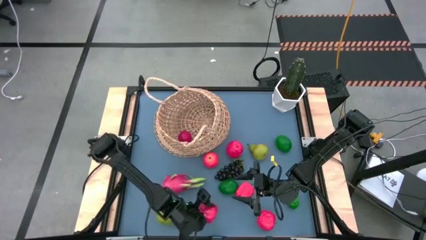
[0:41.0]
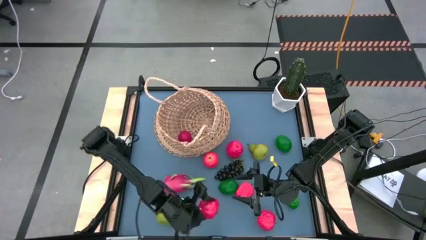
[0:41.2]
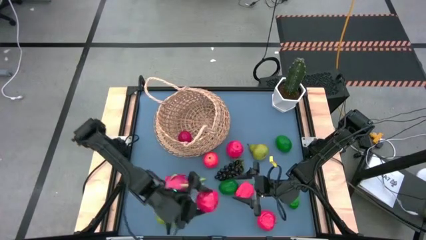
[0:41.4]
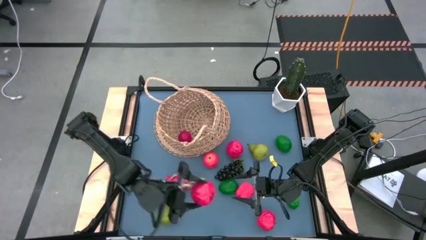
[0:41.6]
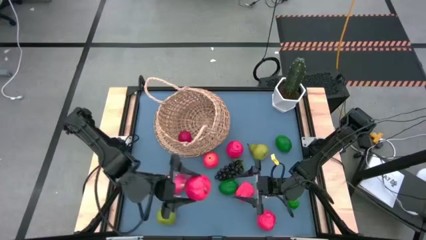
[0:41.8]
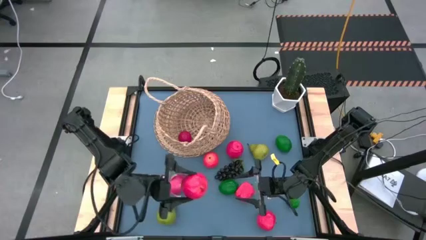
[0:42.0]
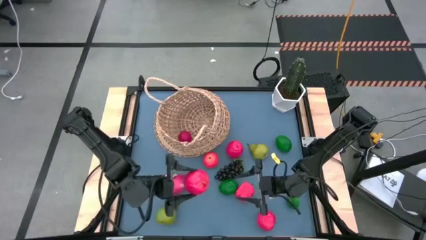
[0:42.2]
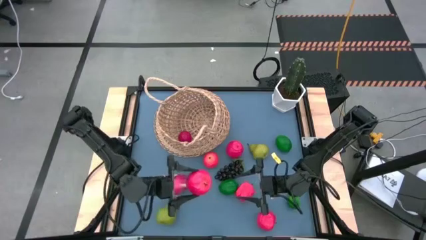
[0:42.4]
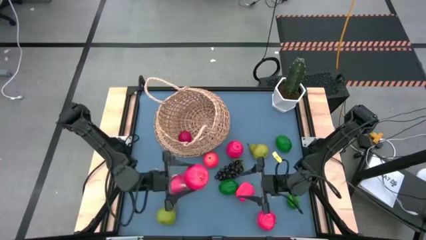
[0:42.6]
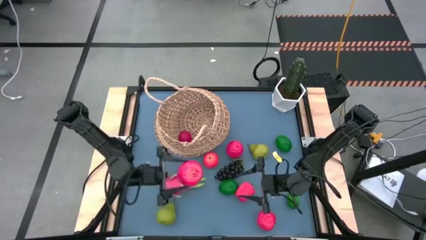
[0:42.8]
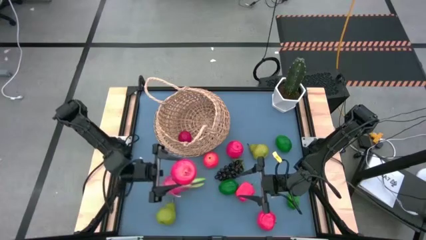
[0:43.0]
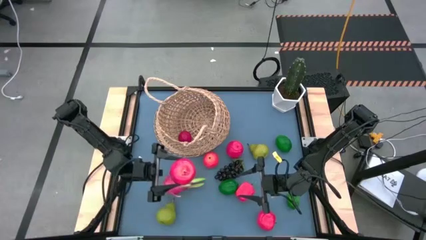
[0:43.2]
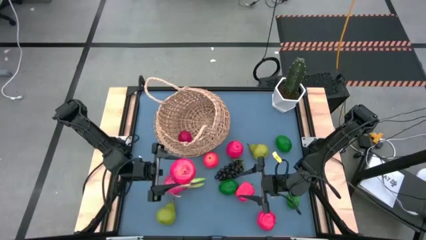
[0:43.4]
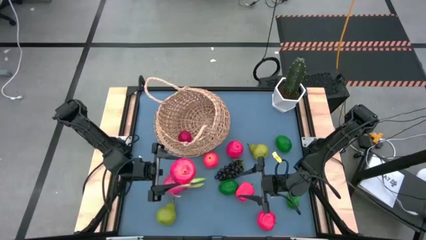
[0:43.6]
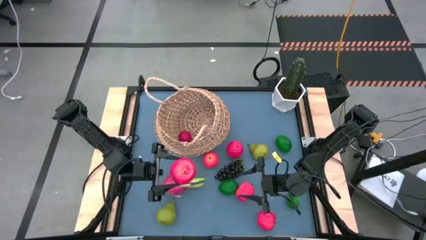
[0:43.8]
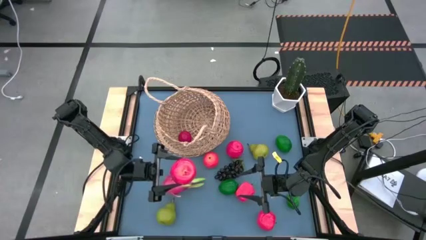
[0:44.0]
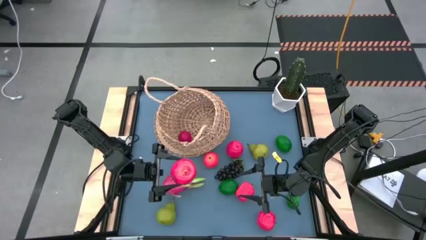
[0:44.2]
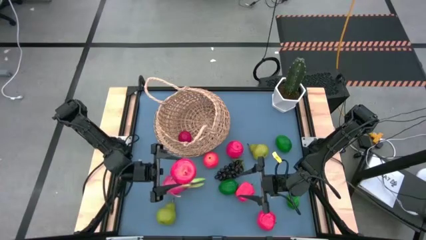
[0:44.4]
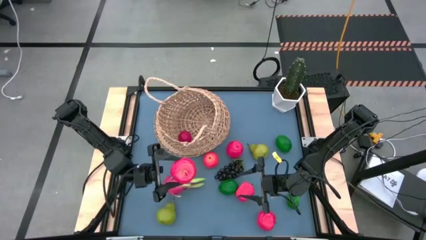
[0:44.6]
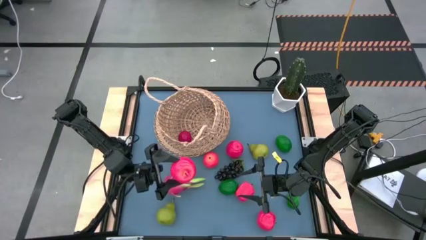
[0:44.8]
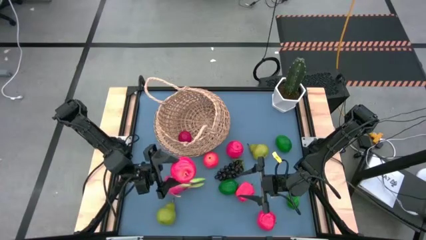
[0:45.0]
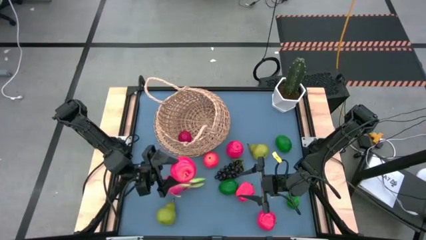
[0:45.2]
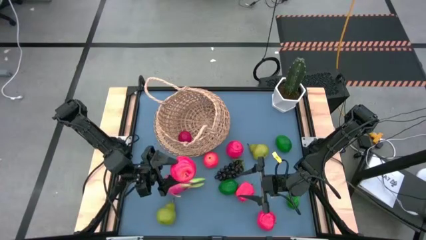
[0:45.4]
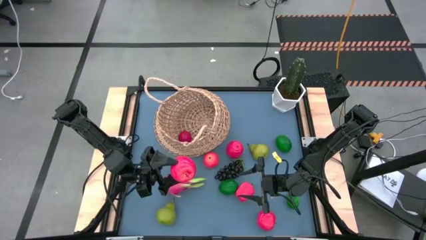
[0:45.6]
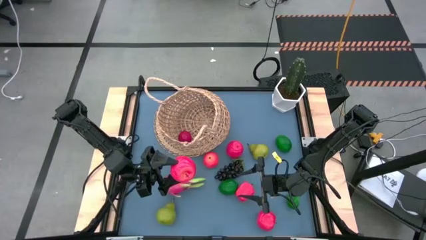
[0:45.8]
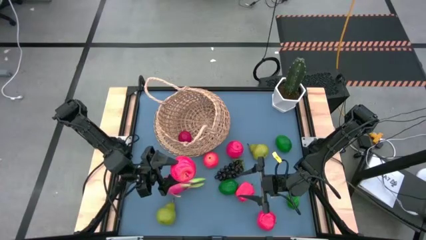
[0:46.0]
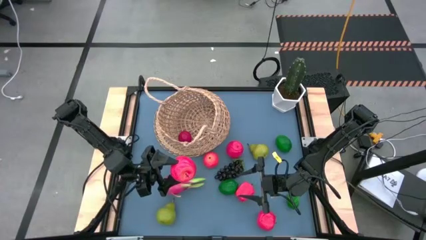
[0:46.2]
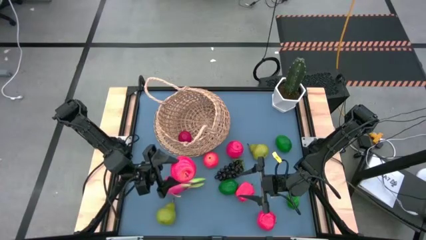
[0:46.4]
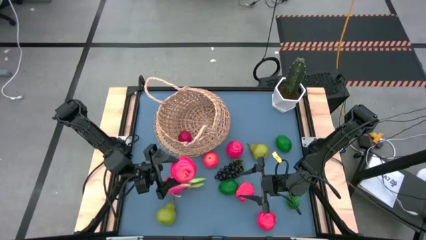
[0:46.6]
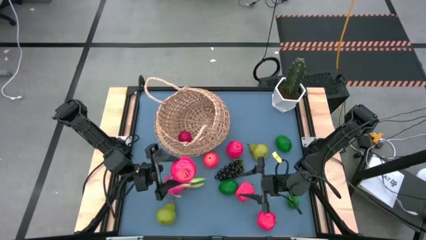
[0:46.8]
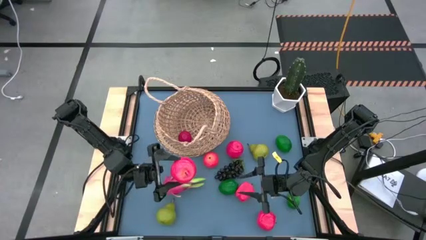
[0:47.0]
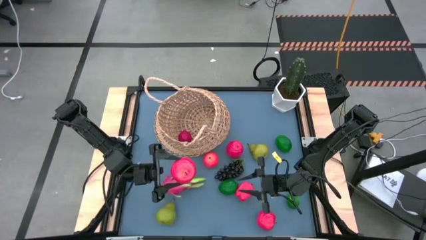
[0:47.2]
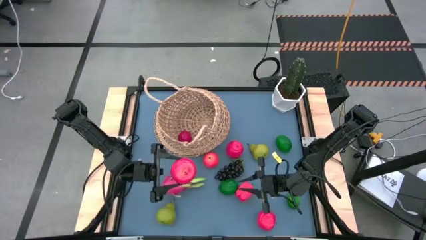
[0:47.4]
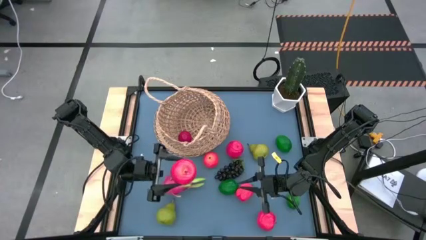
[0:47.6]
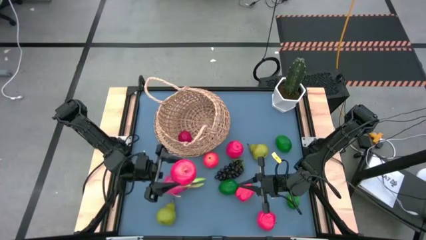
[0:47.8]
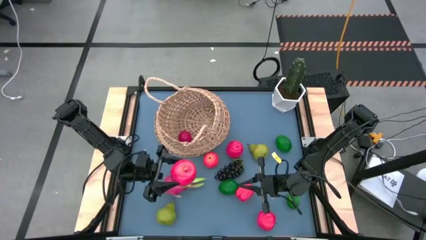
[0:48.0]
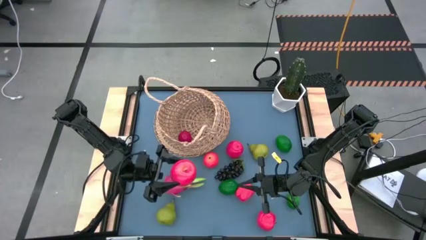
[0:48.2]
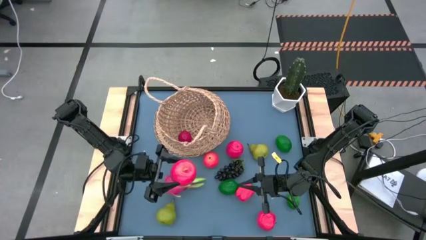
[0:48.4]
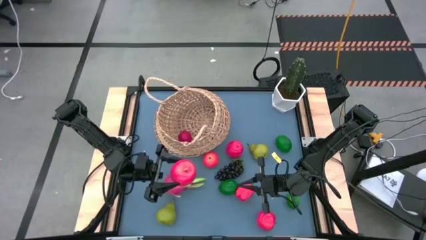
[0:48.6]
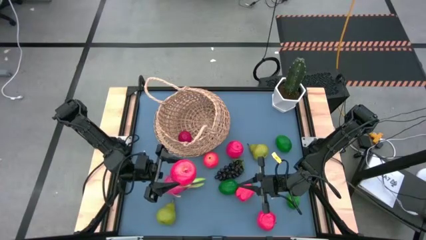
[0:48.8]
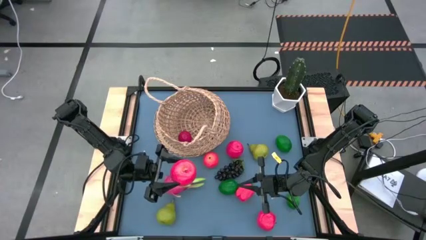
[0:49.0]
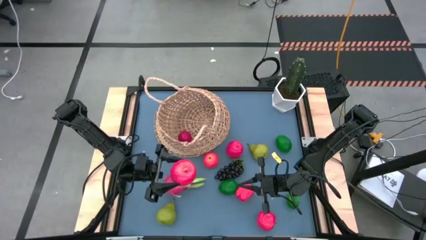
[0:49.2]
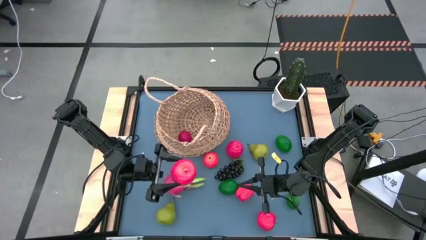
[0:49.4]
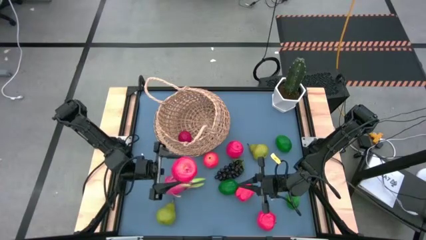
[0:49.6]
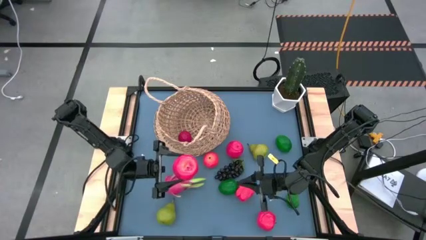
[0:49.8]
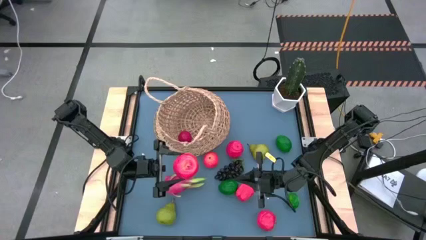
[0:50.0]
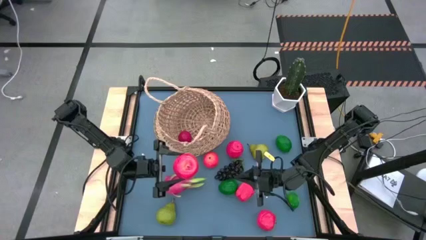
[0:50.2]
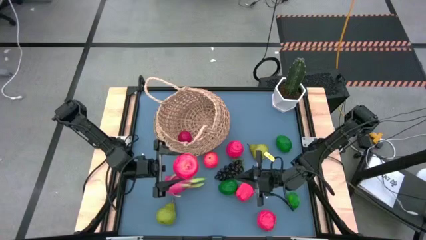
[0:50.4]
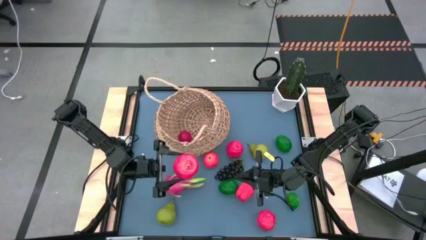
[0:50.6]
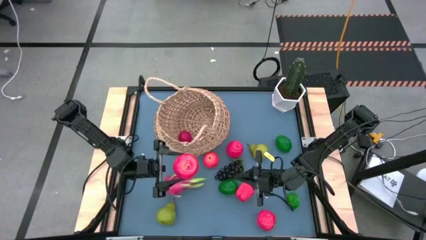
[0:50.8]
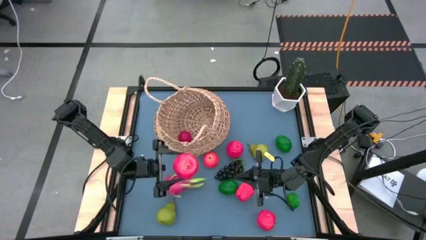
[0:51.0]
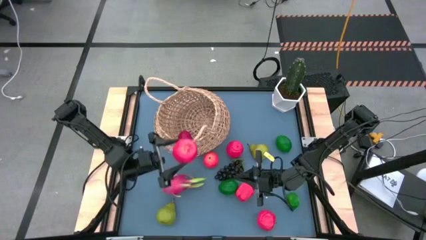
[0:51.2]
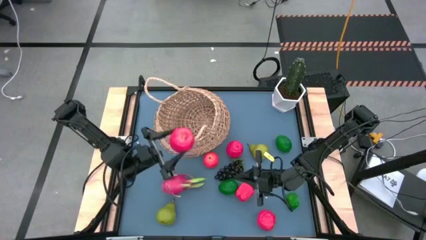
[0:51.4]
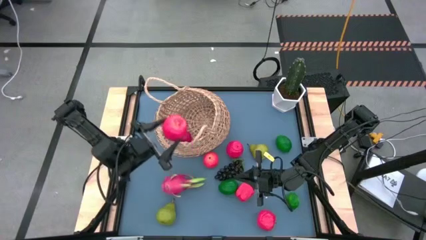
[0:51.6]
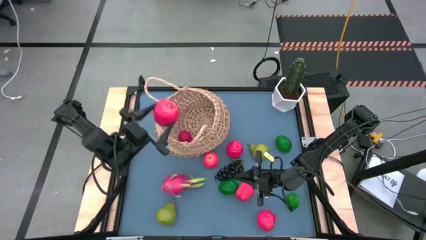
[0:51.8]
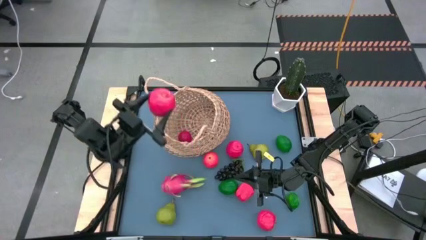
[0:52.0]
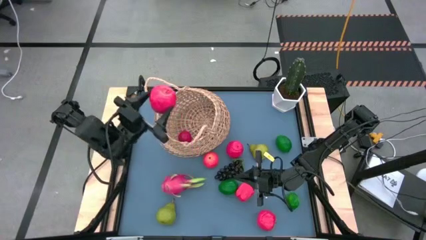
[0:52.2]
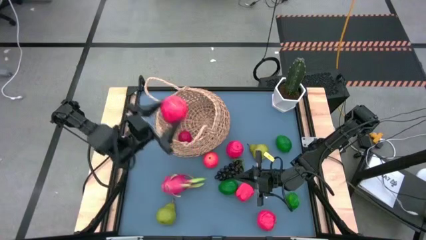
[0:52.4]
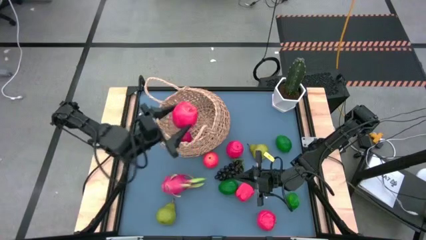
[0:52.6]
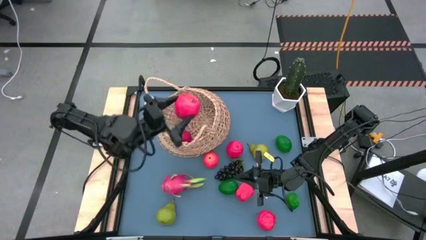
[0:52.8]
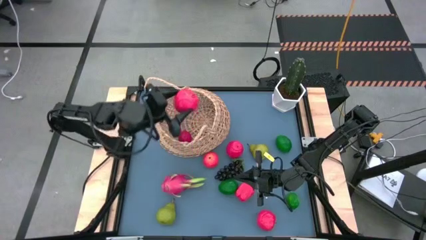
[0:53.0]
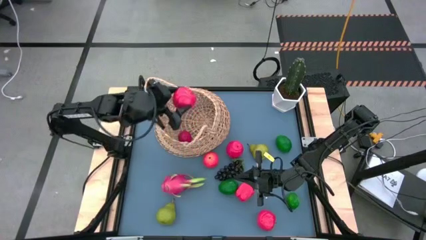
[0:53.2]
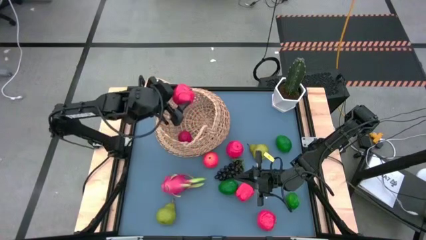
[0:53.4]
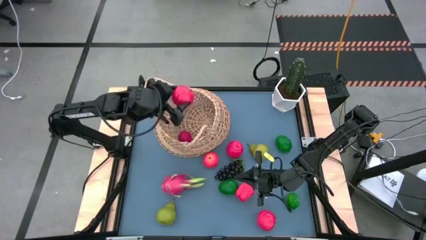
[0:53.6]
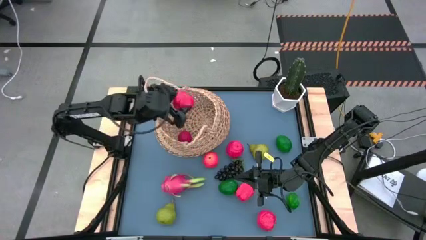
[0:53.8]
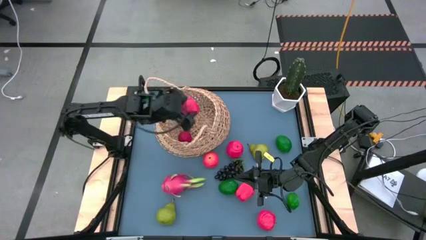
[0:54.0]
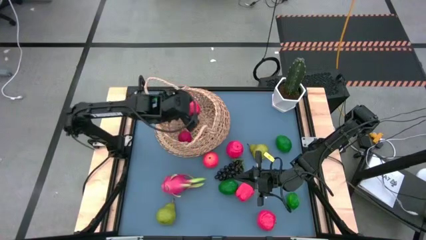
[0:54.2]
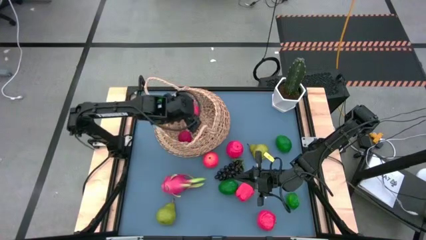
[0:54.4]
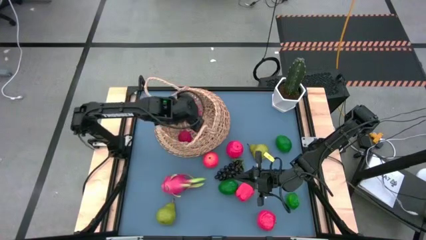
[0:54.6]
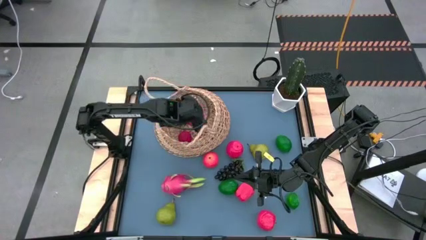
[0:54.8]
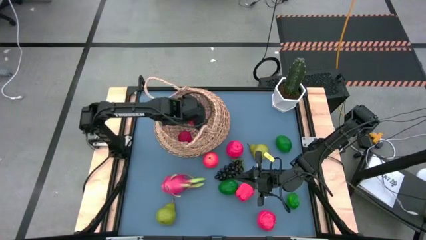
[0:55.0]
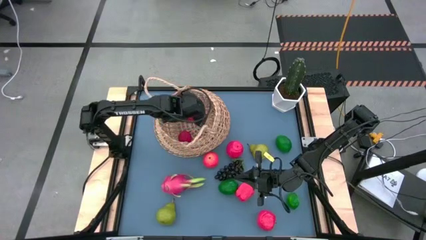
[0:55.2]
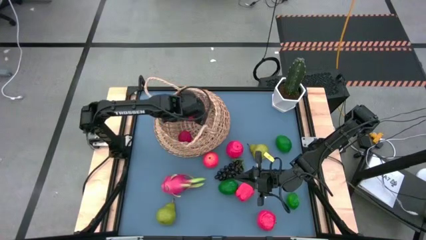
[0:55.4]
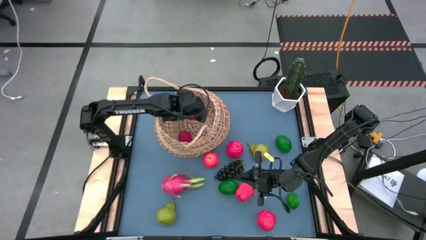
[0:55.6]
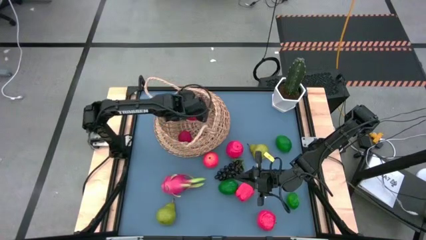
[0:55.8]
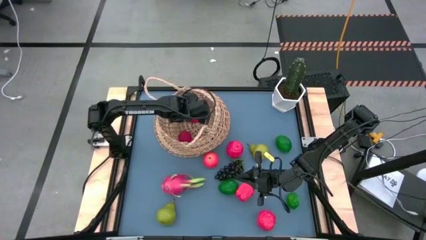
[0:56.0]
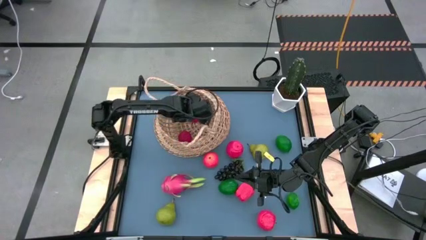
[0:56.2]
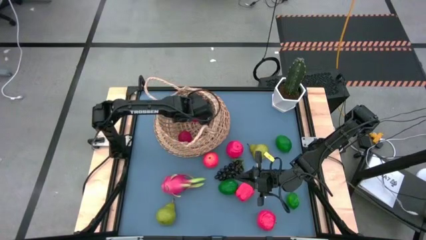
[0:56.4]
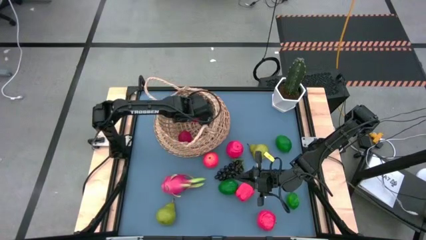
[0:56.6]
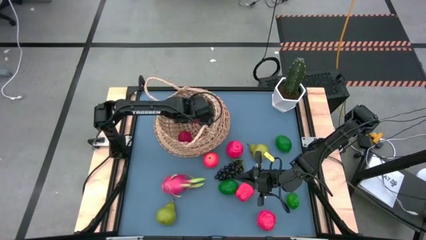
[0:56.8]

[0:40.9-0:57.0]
Task: Build produce basket
Put the red apple into the basket
